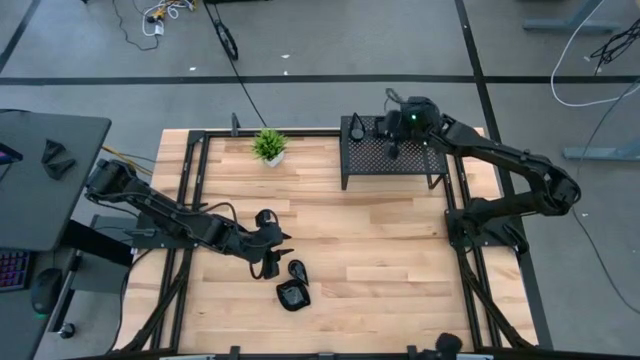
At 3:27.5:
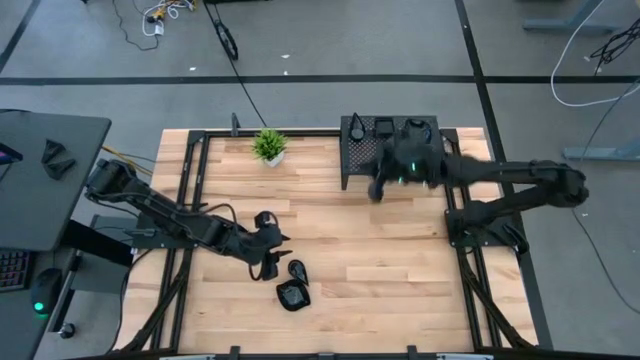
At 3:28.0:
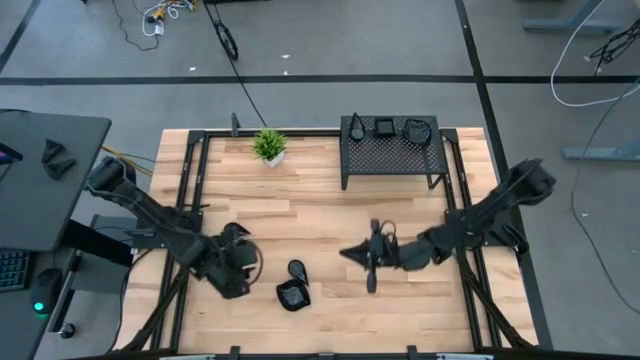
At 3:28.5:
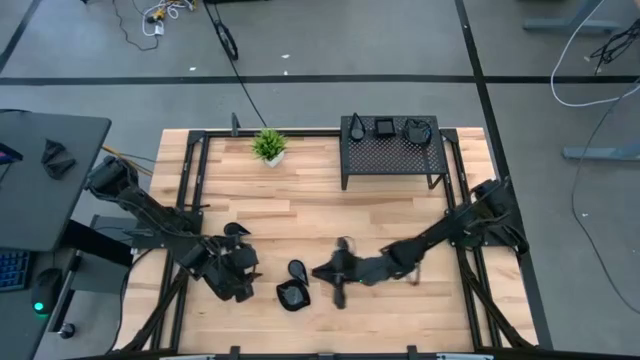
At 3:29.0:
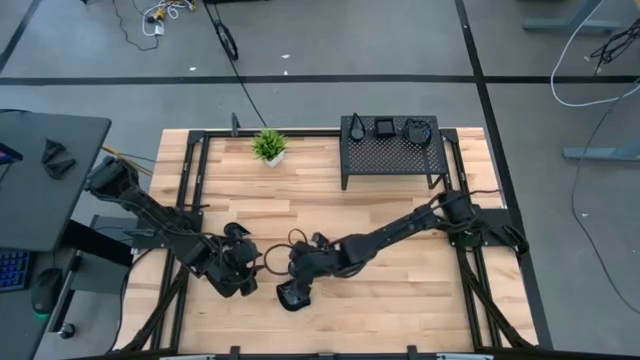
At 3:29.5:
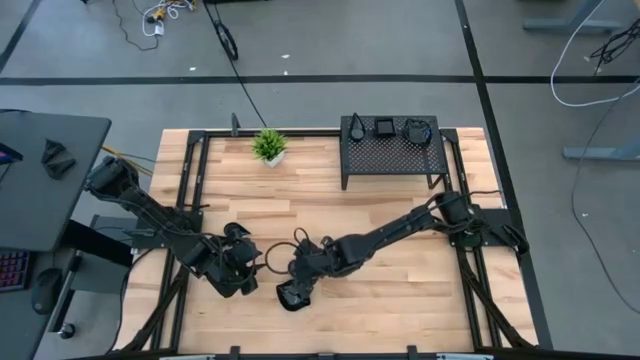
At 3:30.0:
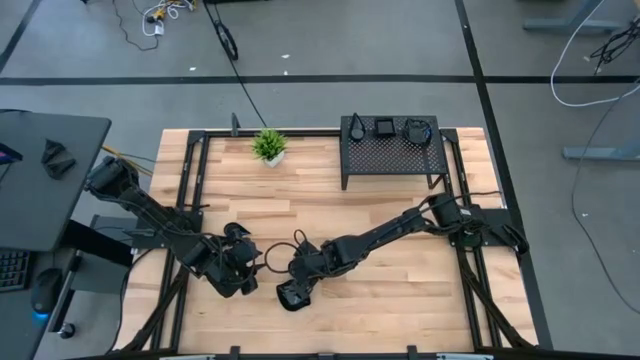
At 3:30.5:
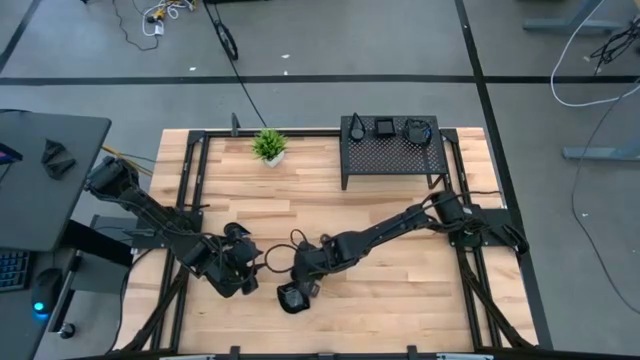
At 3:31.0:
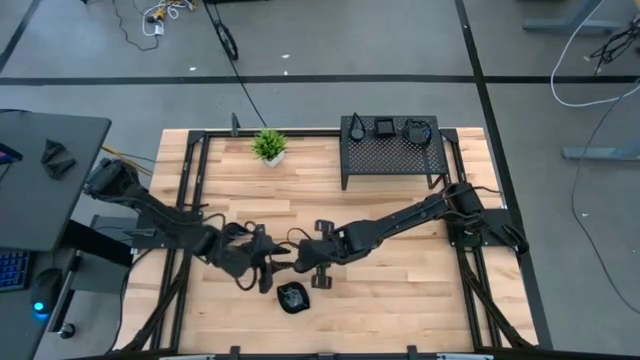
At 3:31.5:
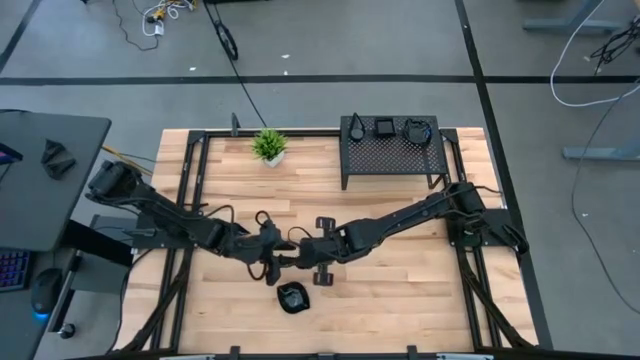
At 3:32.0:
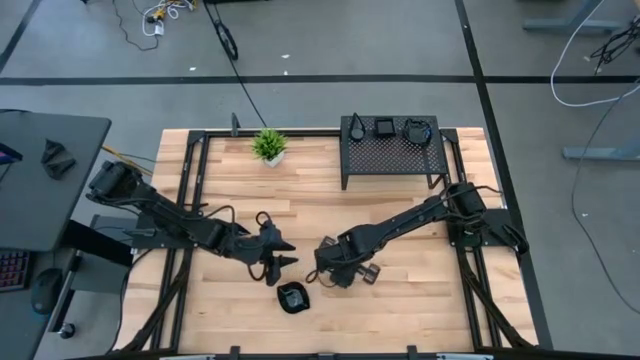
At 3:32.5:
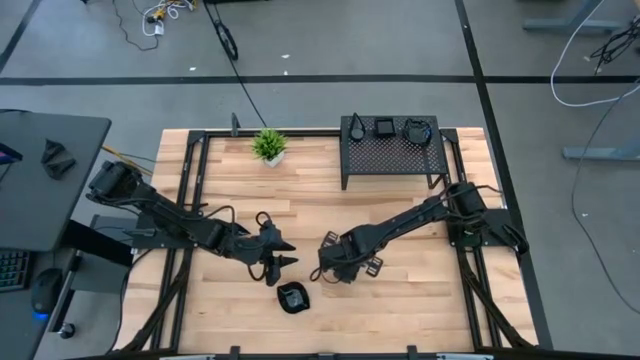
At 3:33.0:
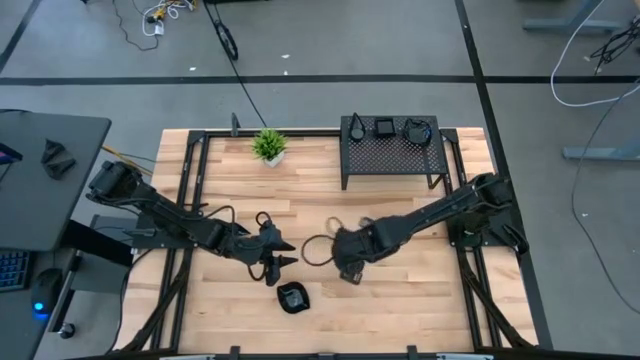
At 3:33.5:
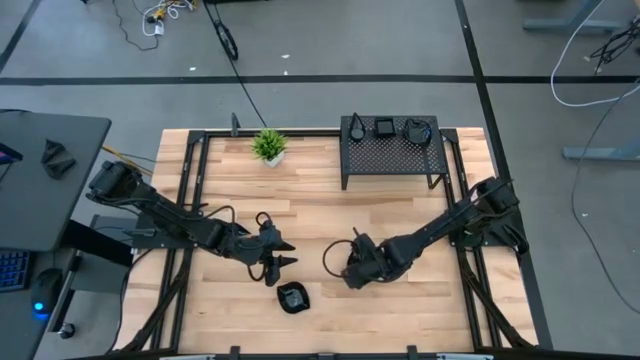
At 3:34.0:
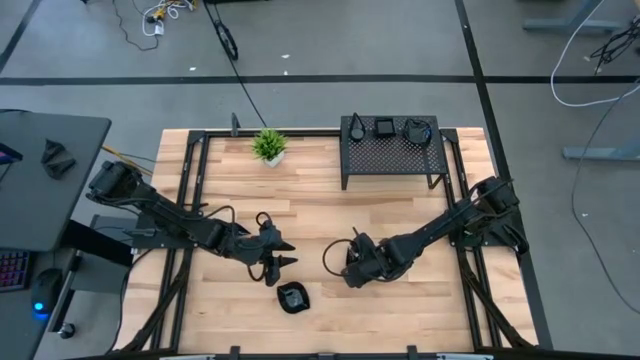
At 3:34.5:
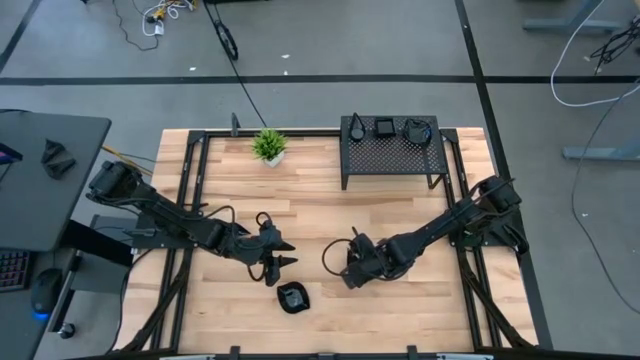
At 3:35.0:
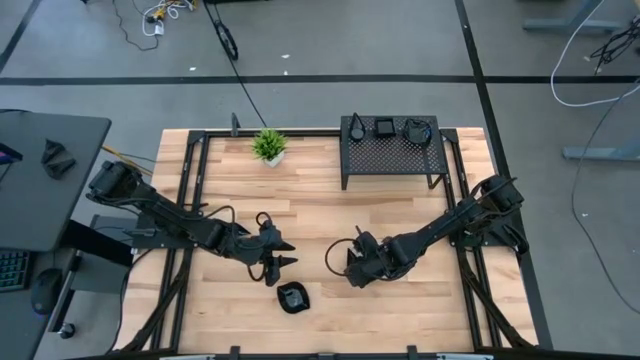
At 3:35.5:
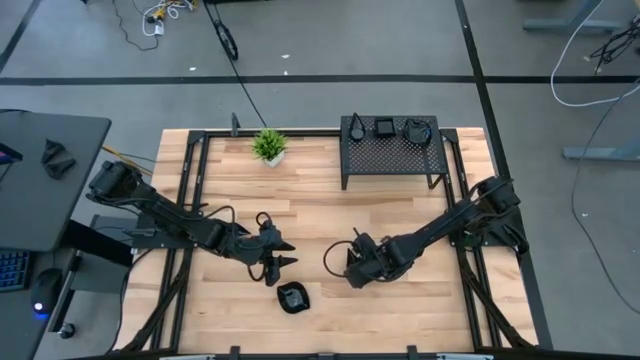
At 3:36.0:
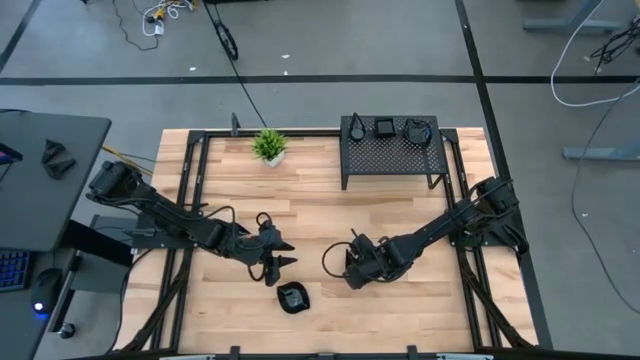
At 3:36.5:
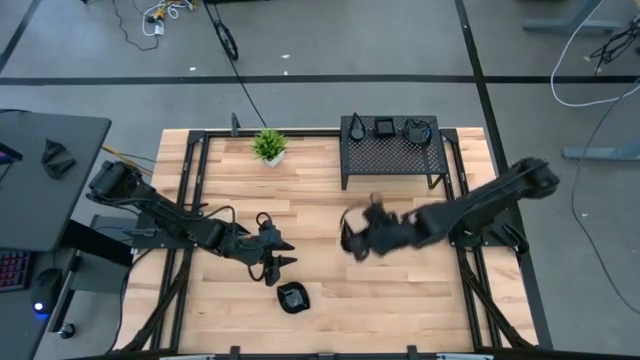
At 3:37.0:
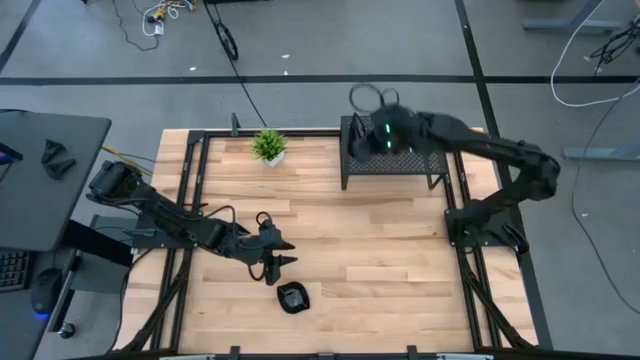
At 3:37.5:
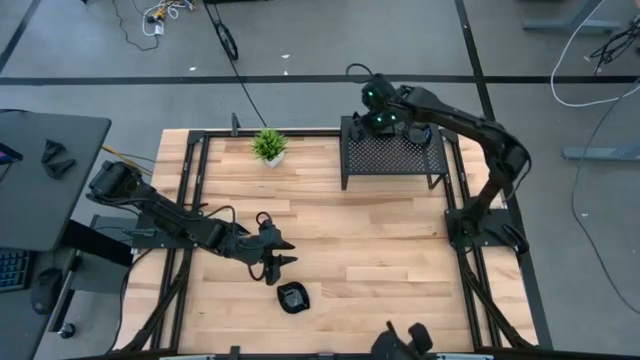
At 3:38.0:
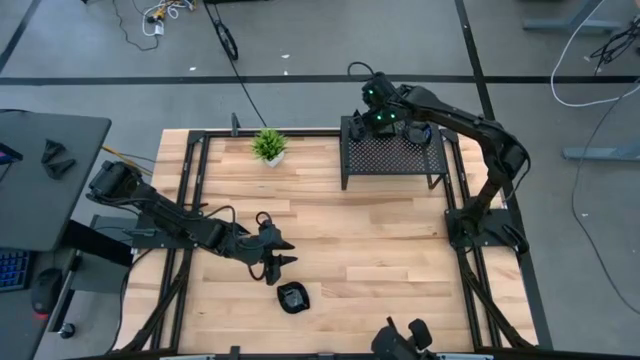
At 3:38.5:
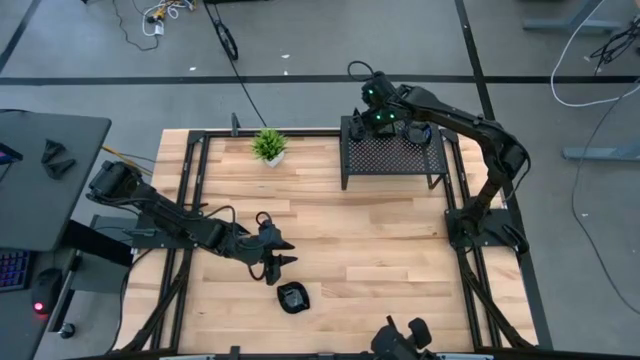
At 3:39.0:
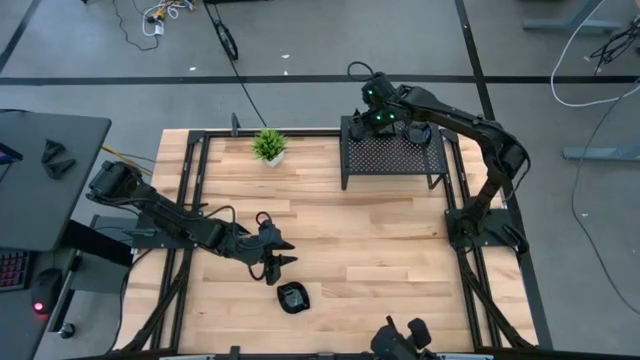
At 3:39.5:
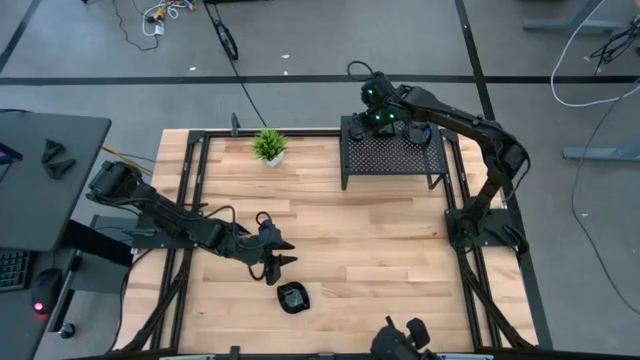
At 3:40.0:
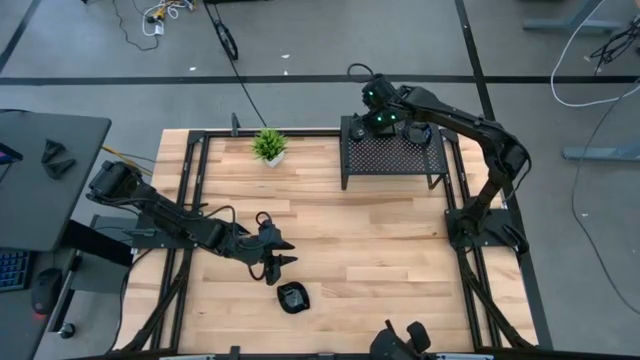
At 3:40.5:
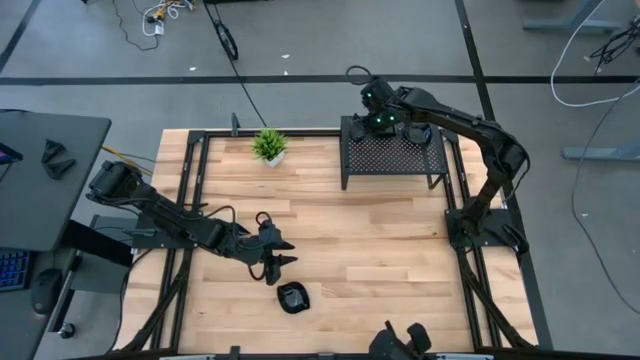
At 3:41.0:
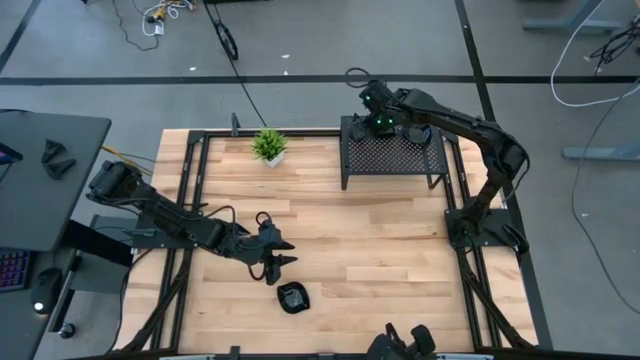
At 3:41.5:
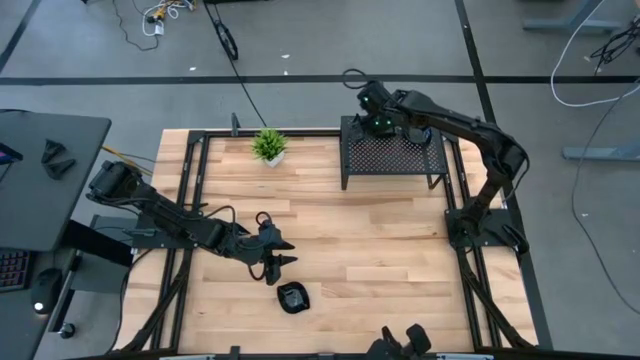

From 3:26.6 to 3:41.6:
Task: Pick & Place Mini shaped plates
Stack the black drop-shaped plate on top of the black drop-shaped plate on the shelf

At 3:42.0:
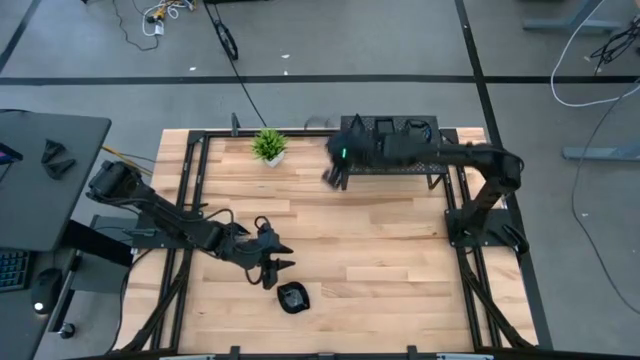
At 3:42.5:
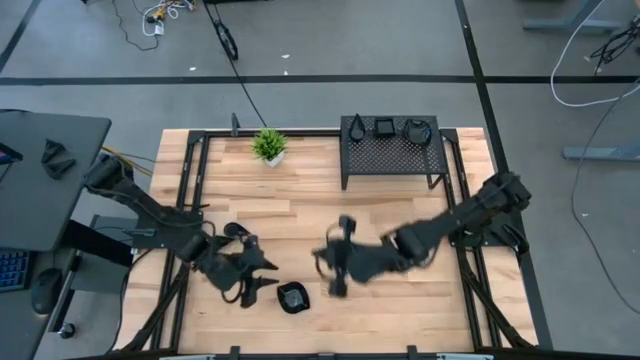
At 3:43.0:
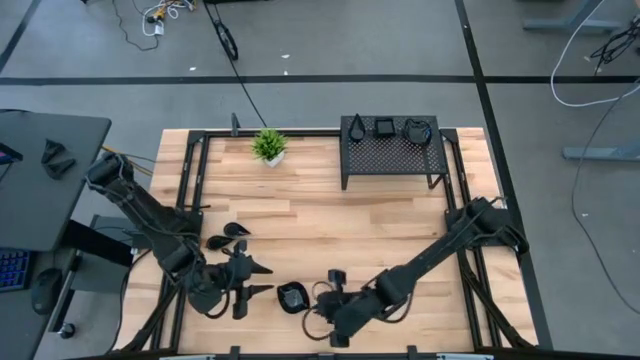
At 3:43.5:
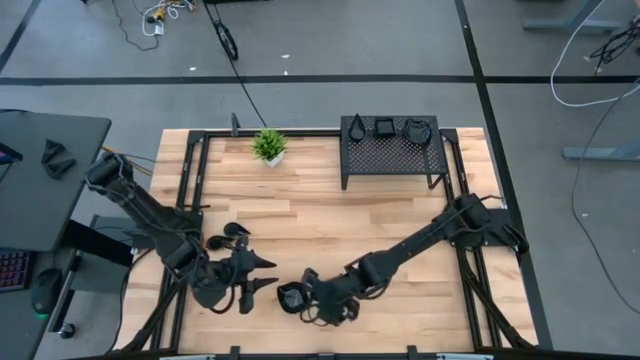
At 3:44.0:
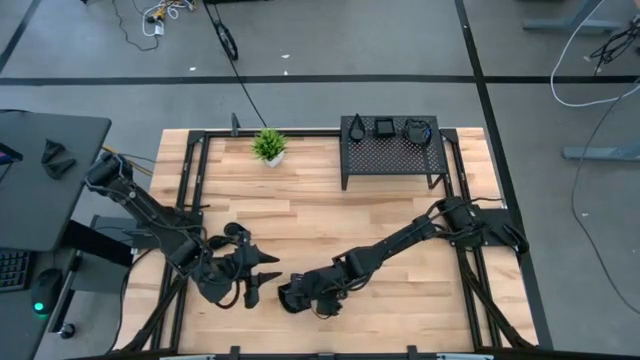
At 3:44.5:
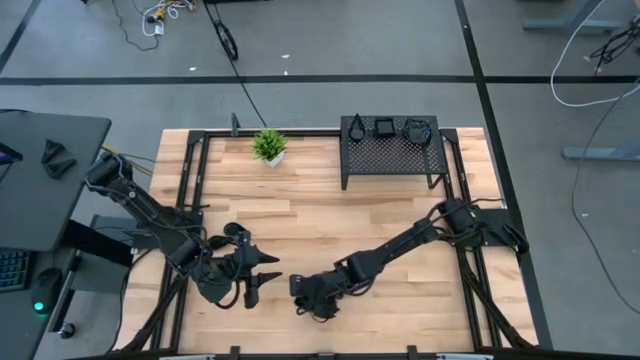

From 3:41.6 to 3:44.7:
Stack the black leaf-shaped plate on top of the black leaf-shaped plate on the shelf

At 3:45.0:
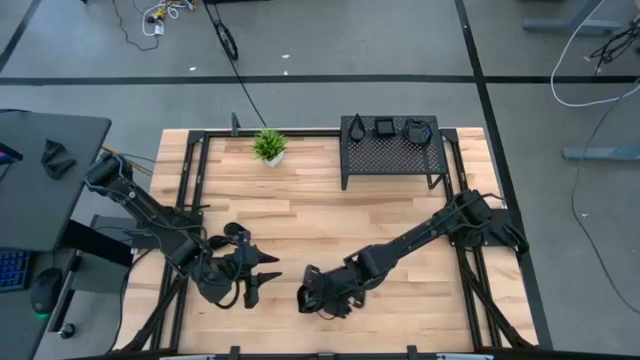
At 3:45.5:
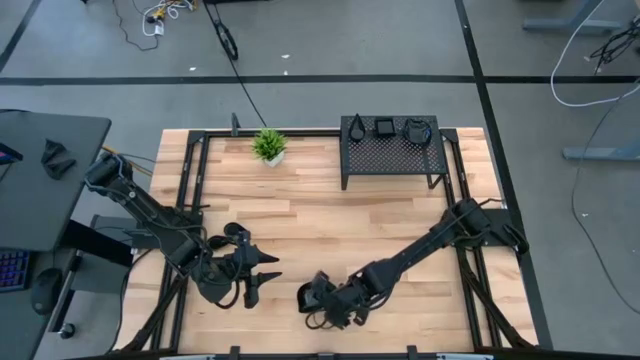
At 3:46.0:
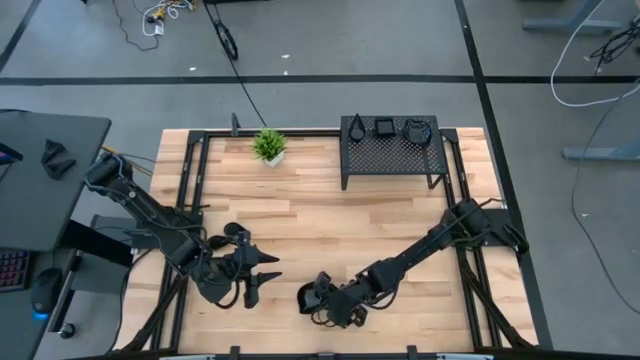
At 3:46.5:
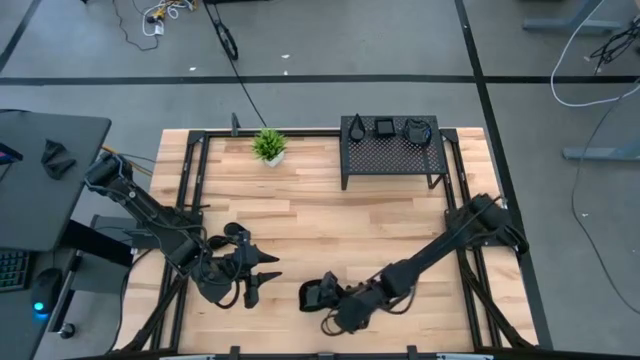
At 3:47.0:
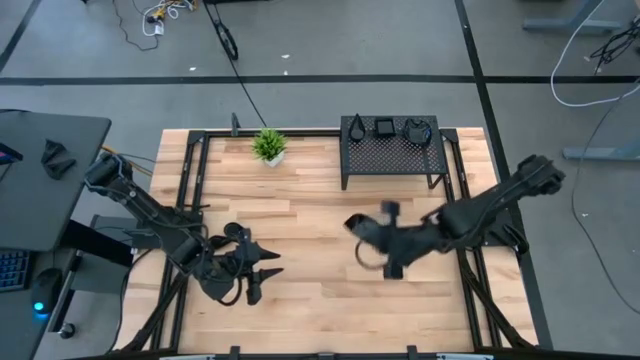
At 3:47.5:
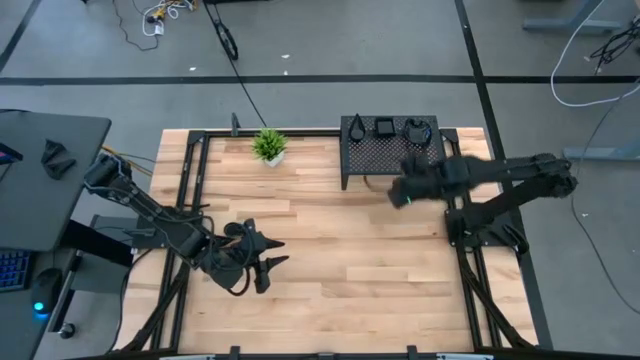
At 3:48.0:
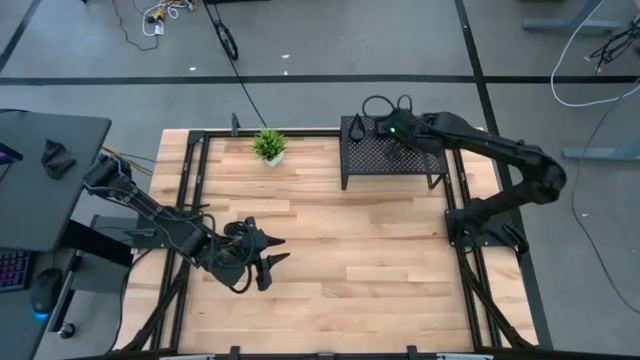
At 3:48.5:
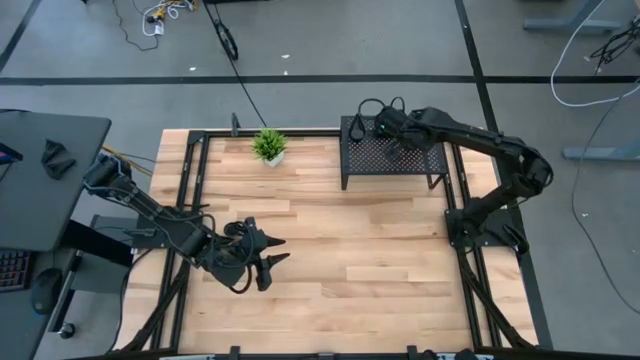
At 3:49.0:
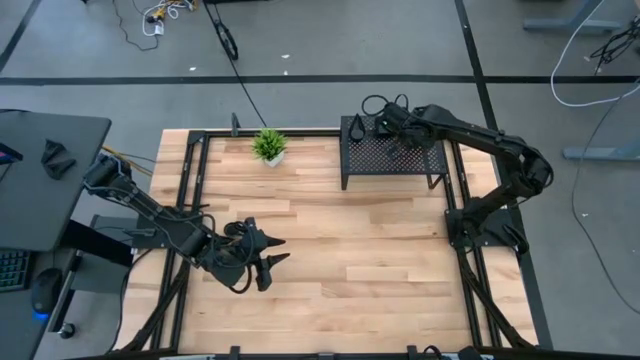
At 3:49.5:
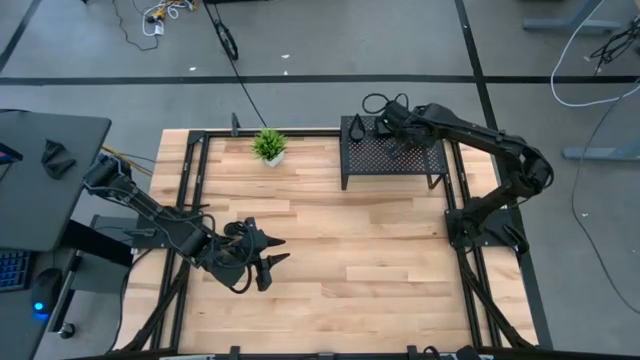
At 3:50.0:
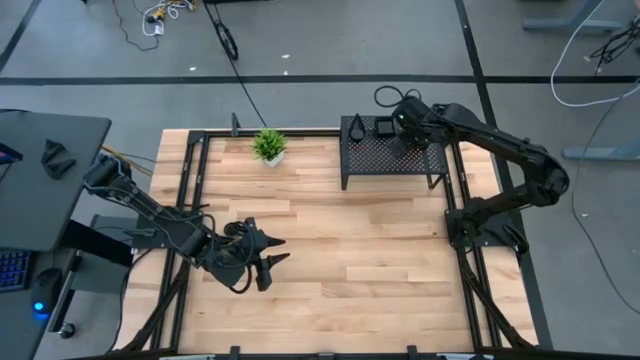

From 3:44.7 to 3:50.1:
Stack the black leaf-shaped plate on top of the black leaf-shaped plate on the shelf
